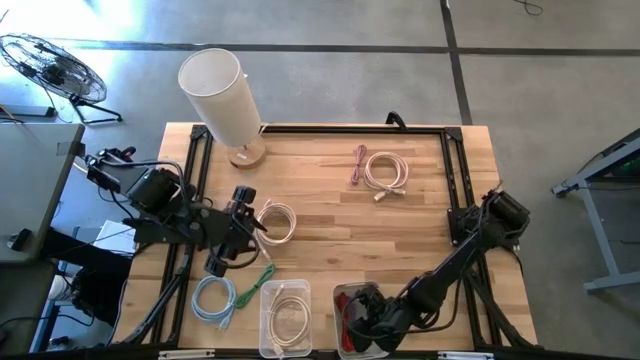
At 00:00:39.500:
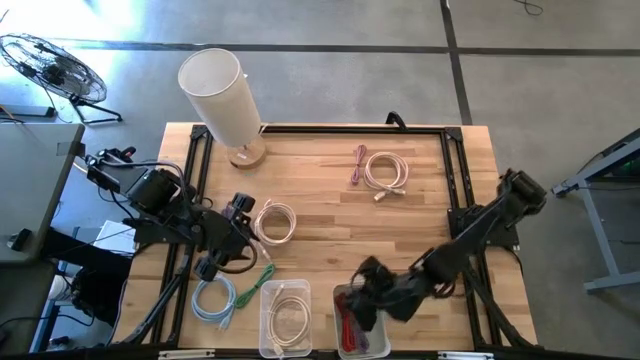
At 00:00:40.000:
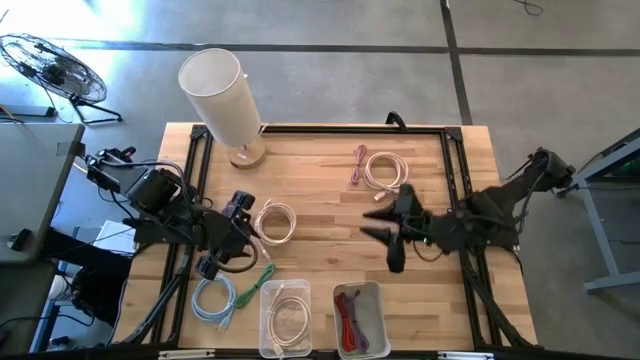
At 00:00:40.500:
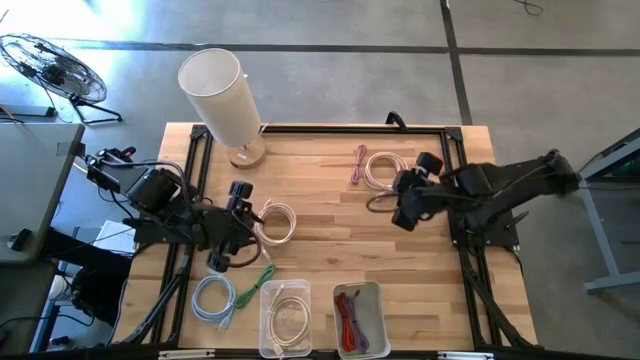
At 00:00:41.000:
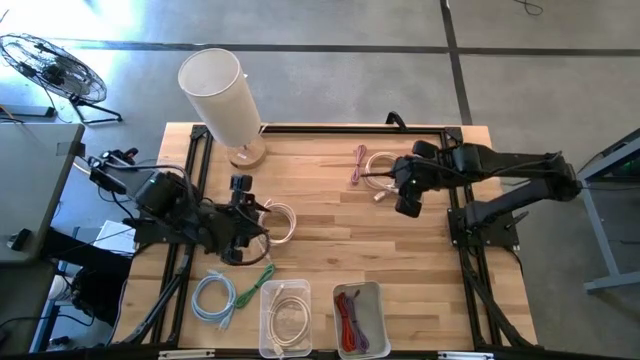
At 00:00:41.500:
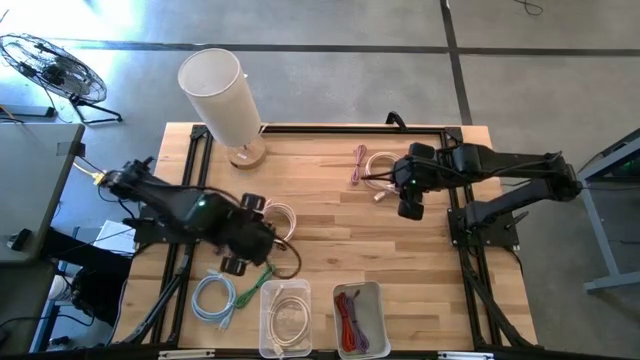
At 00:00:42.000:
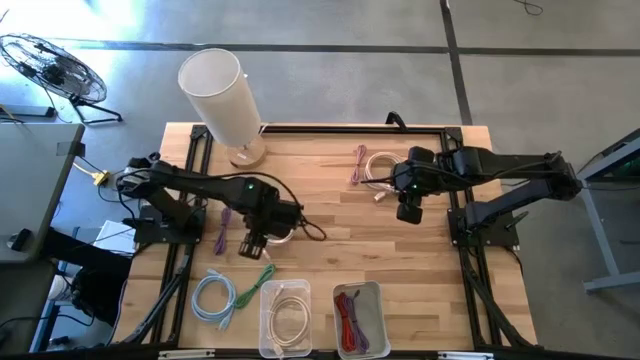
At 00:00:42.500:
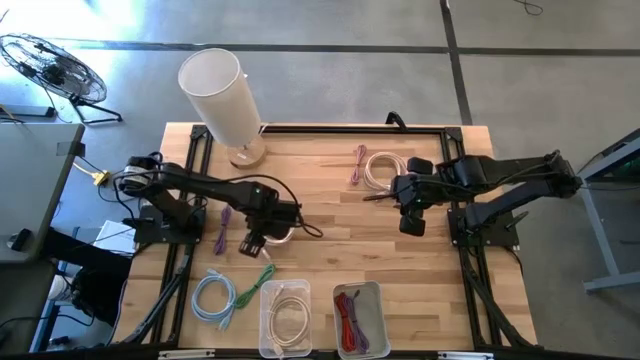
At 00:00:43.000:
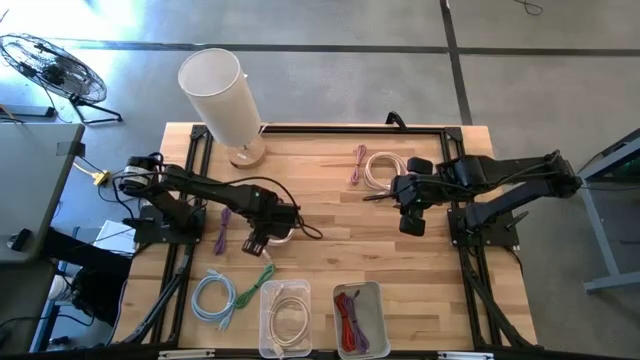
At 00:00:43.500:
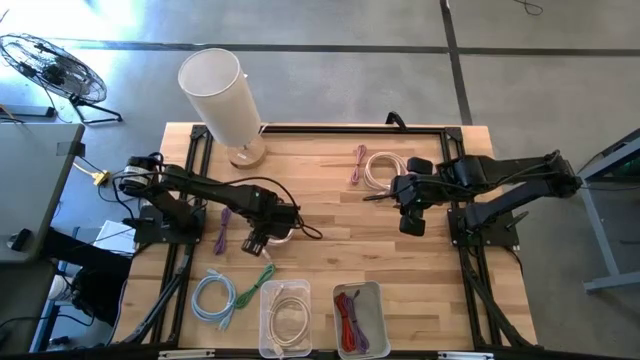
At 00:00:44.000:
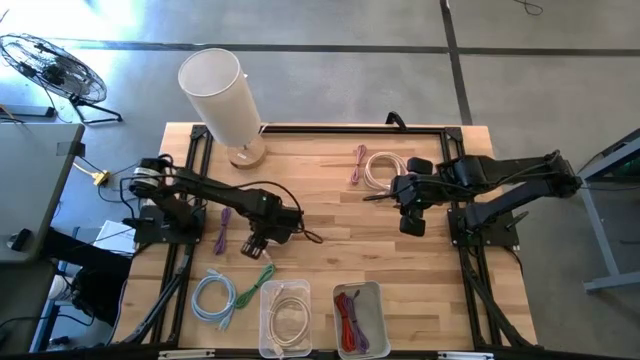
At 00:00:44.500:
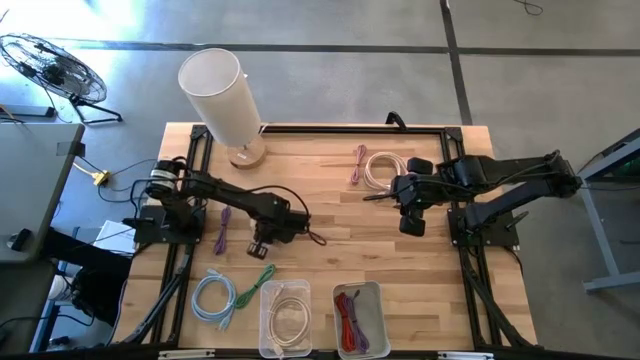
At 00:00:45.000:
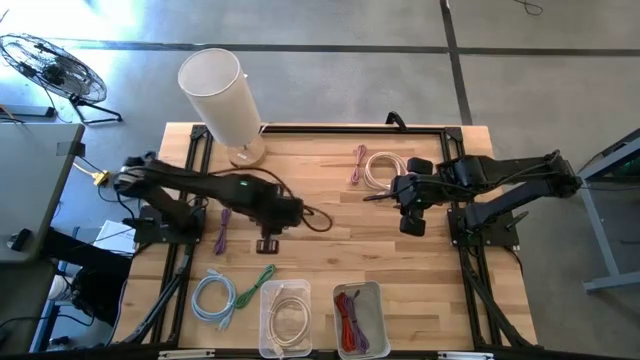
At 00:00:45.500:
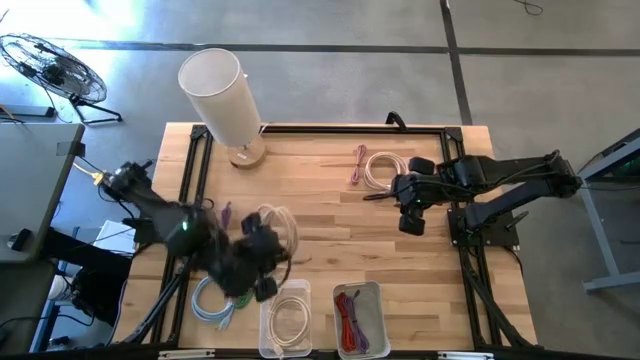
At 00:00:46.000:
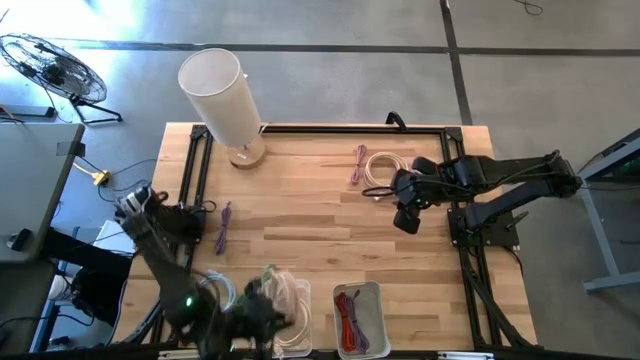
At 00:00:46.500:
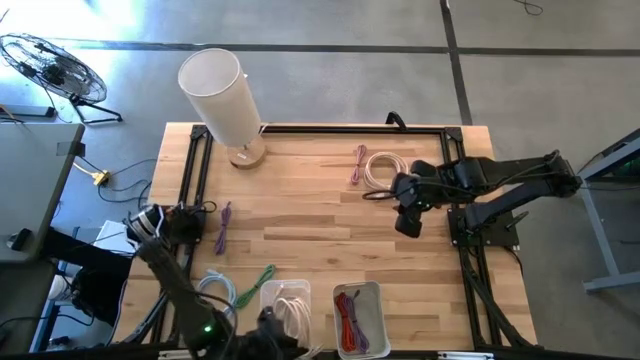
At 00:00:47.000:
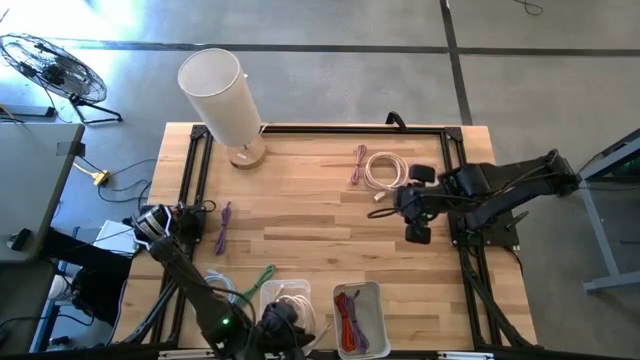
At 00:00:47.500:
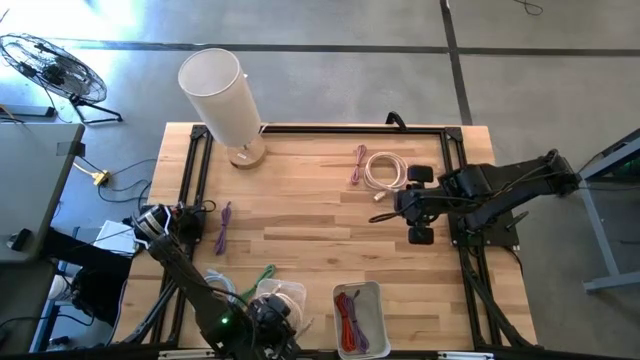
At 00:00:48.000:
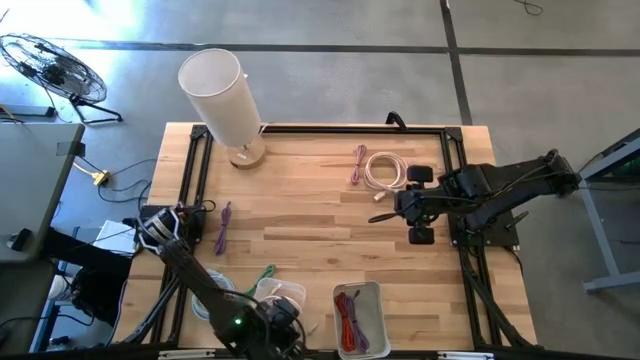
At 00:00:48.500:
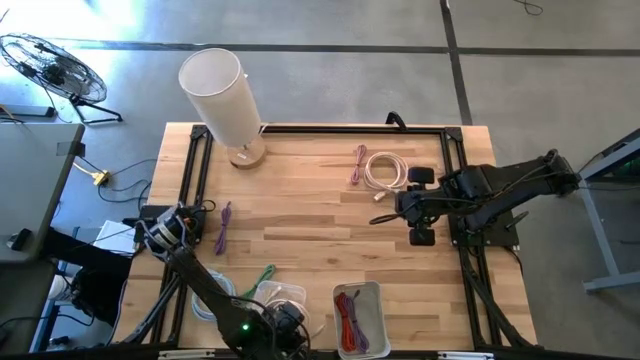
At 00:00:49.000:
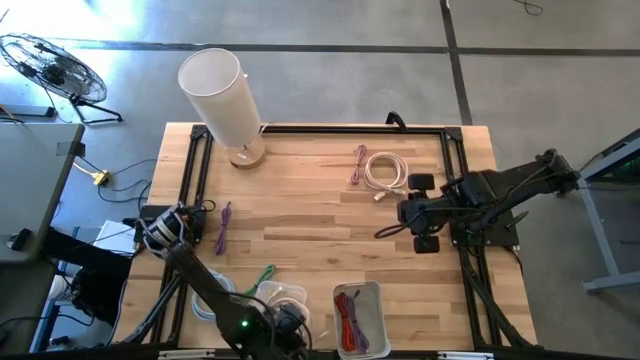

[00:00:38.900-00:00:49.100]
Task: Pick & Place USB Port
Put the bottom pink HDMI cable into the transparent bin

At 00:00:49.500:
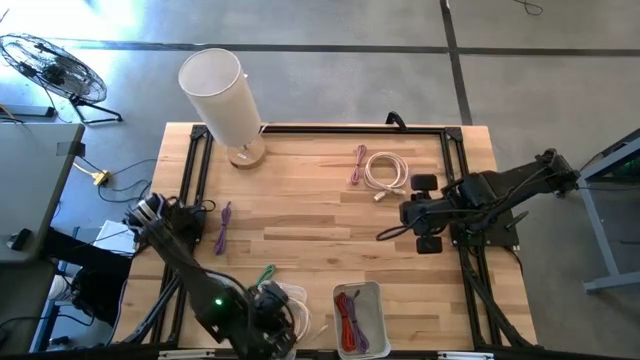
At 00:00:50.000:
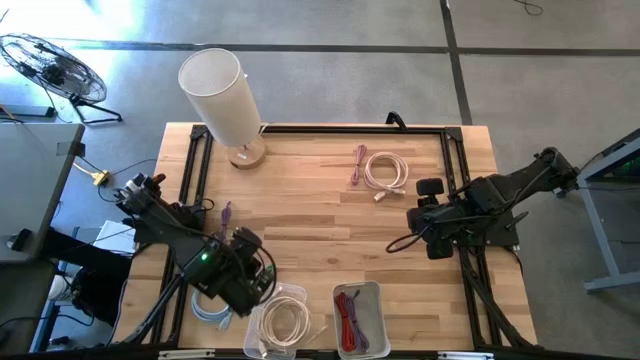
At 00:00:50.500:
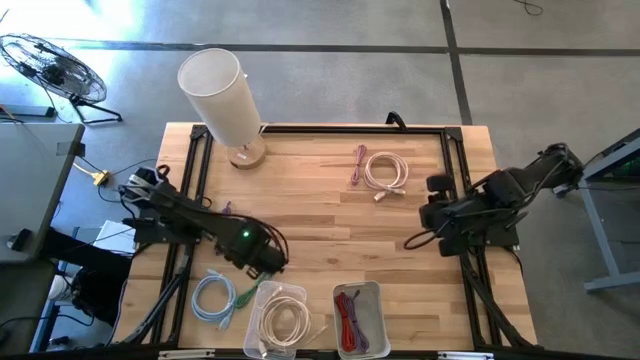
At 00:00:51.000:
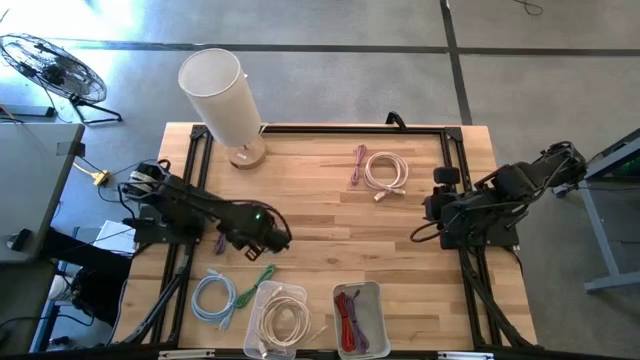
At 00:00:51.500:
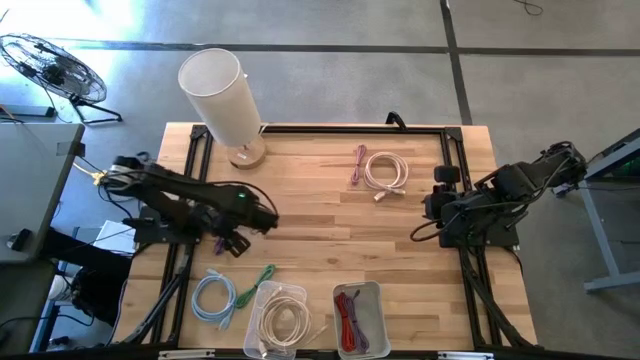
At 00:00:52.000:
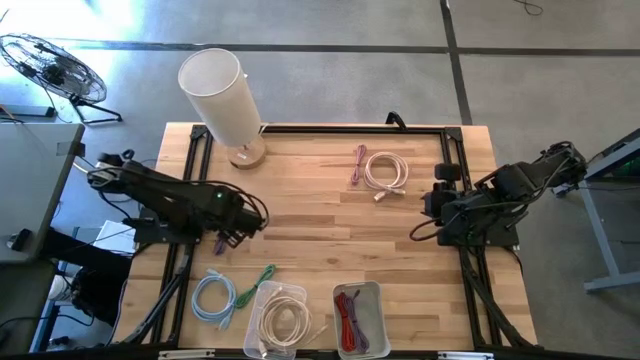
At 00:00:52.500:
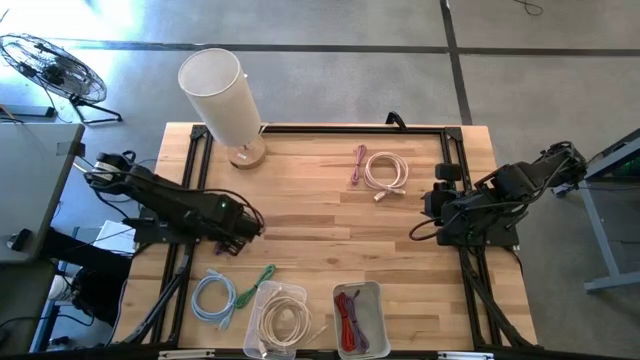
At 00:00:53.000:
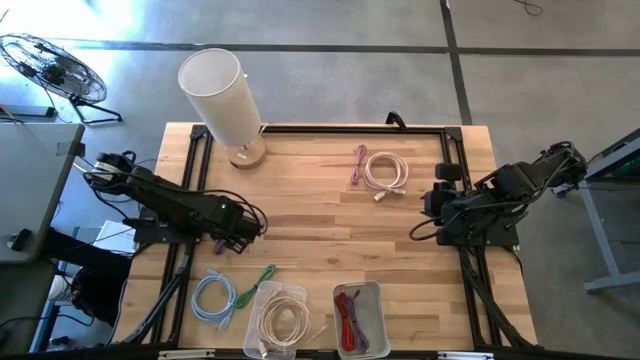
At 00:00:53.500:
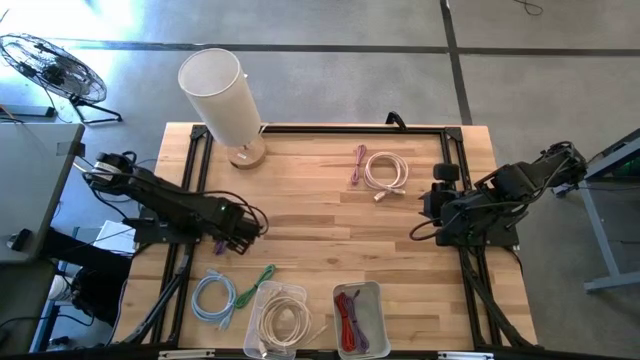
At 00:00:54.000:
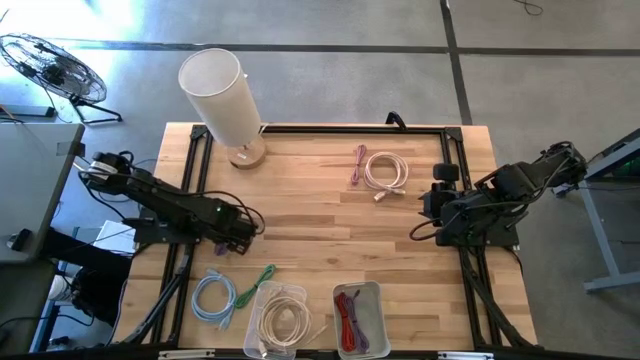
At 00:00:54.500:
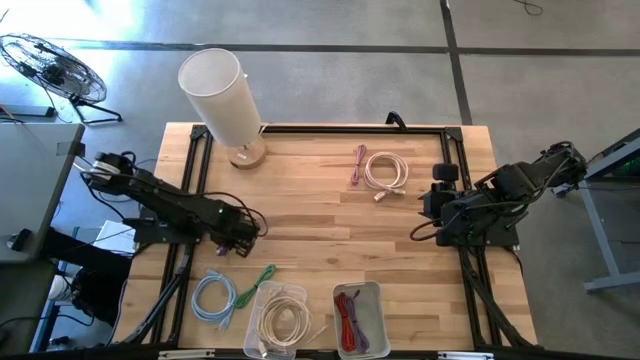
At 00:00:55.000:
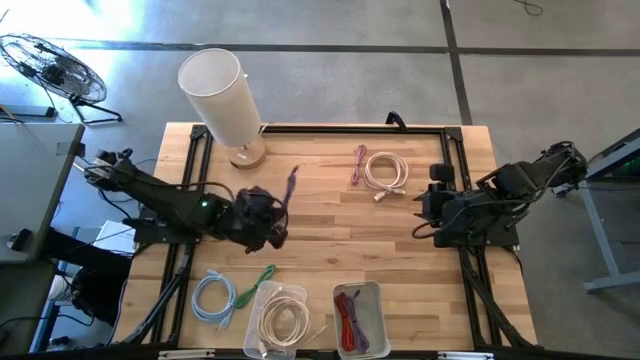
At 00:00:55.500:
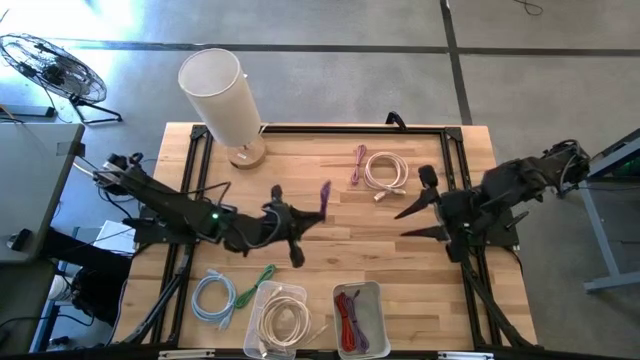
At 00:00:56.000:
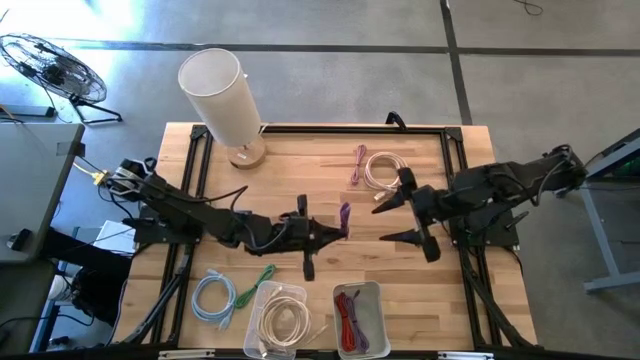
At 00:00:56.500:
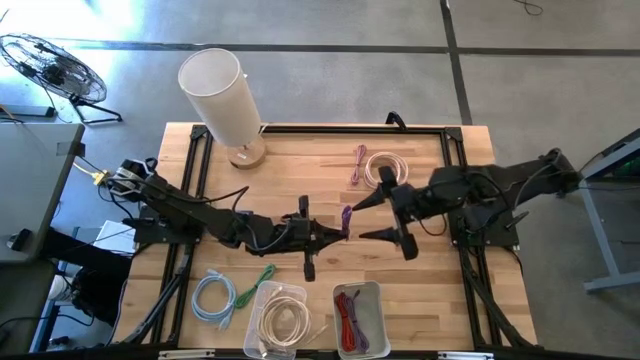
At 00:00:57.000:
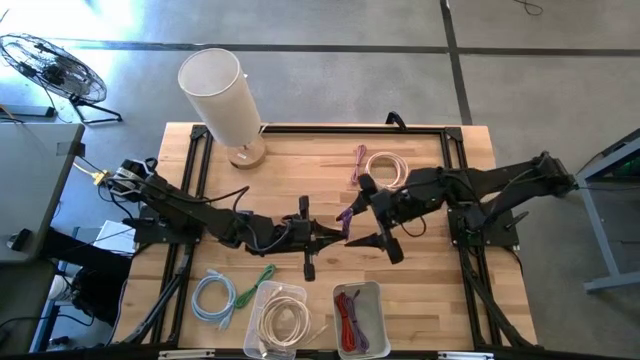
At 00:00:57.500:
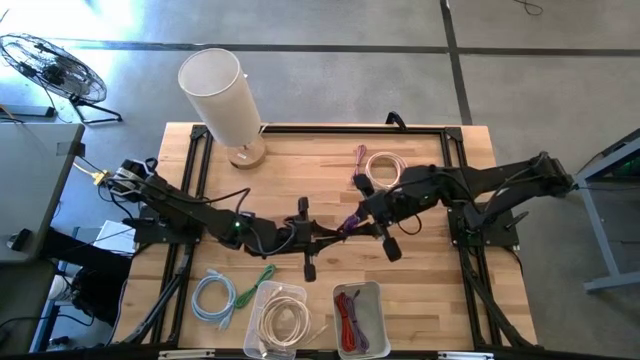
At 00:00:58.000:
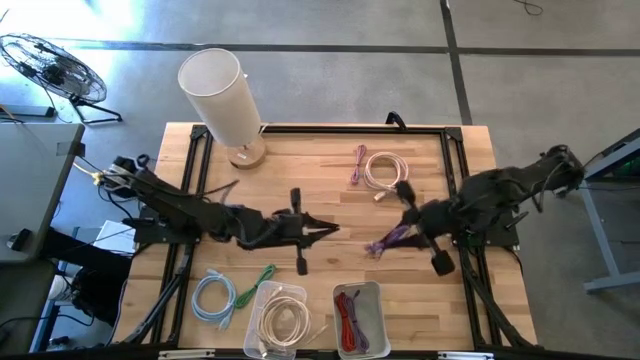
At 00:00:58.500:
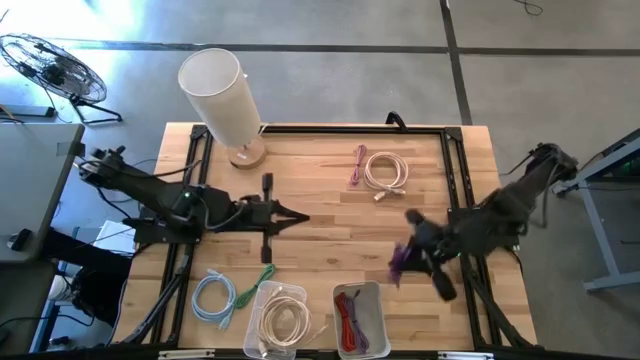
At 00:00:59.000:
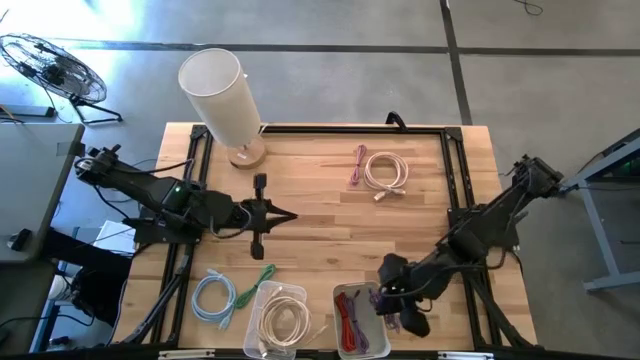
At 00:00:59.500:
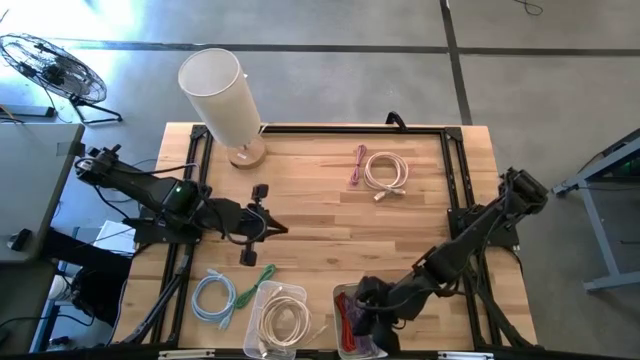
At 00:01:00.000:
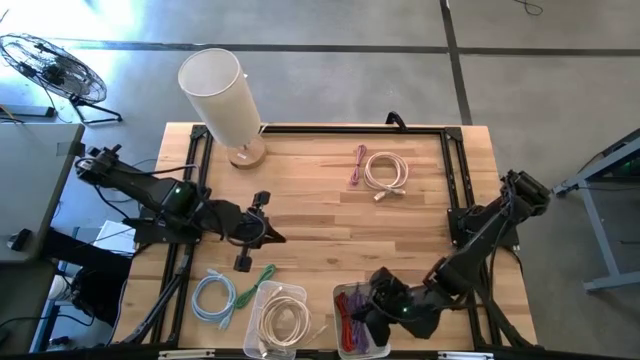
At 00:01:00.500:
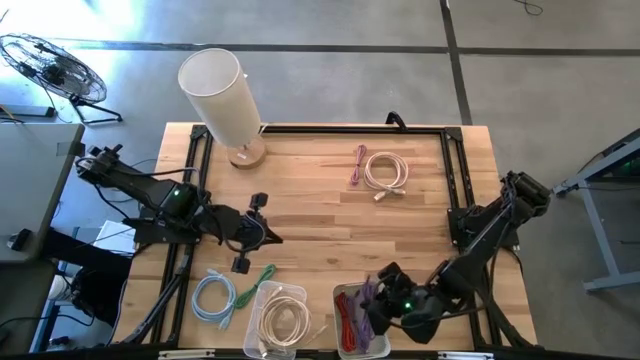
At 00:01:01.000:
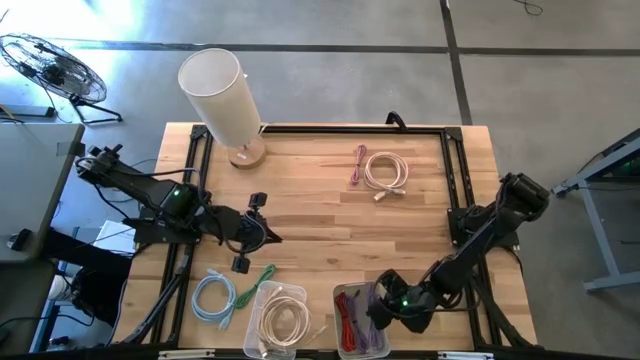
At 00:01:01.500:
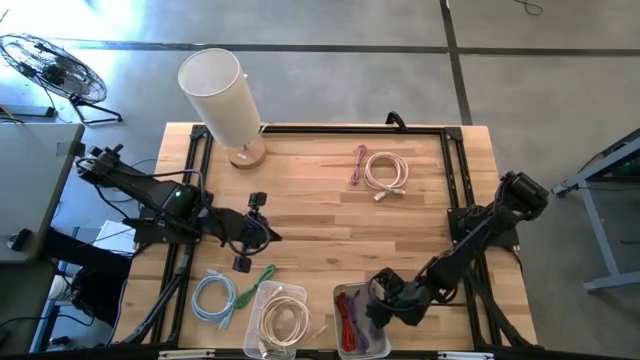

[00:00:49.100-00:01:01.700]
Put the violet USB cable into the gray bin
